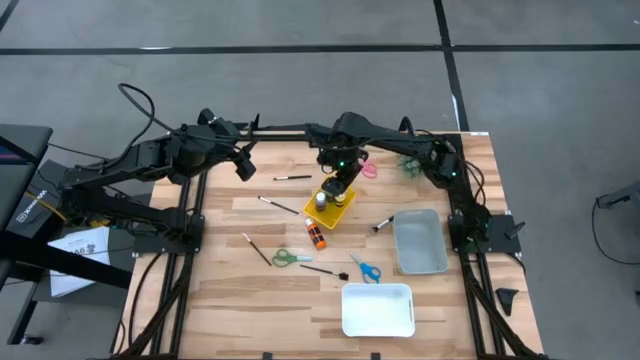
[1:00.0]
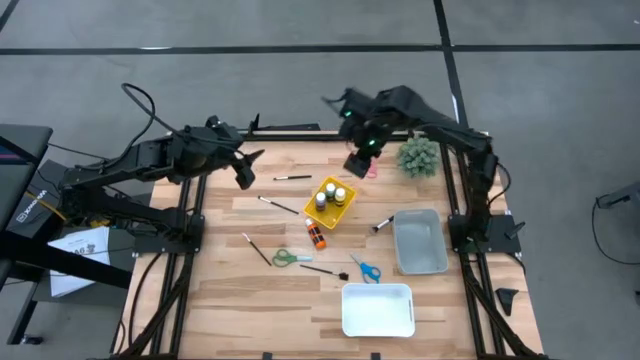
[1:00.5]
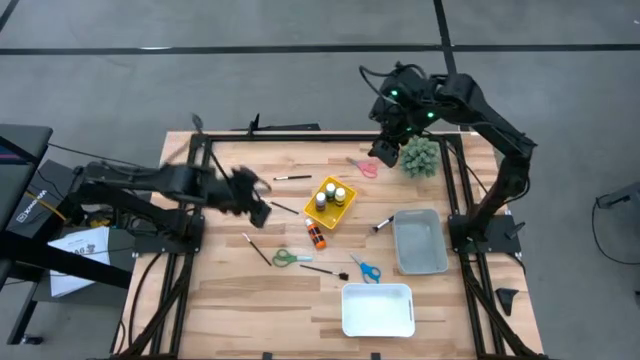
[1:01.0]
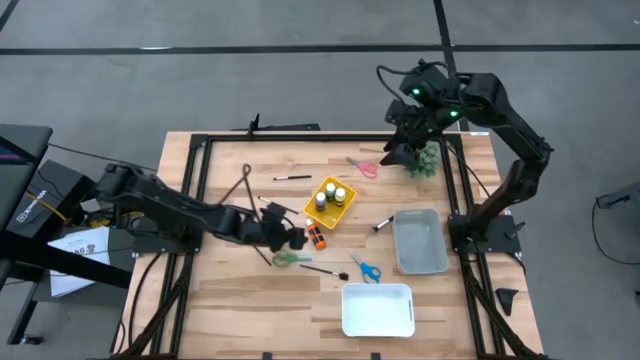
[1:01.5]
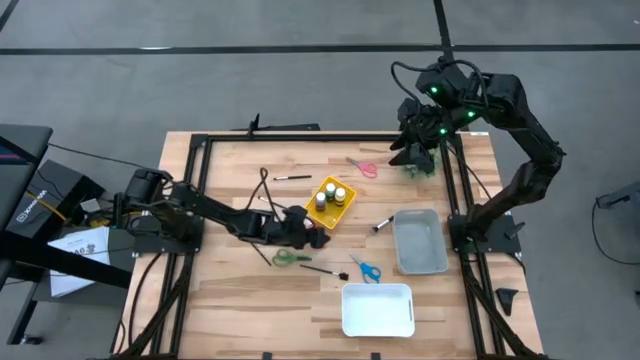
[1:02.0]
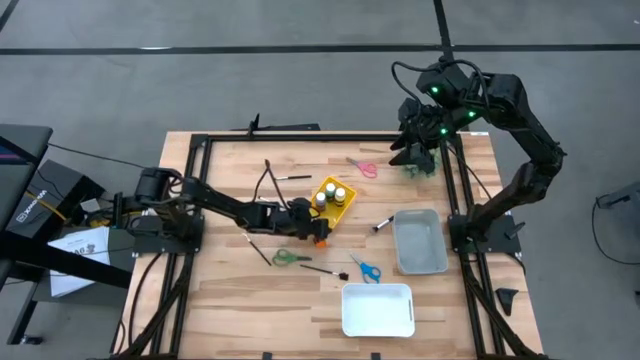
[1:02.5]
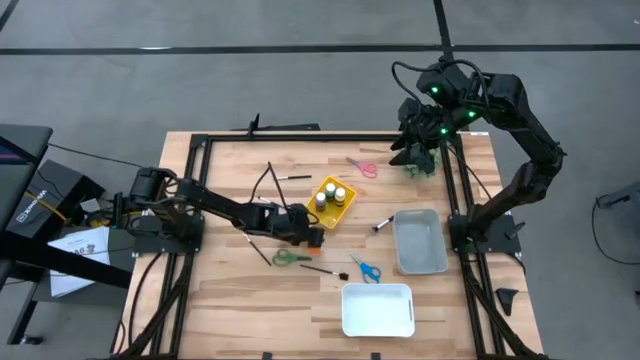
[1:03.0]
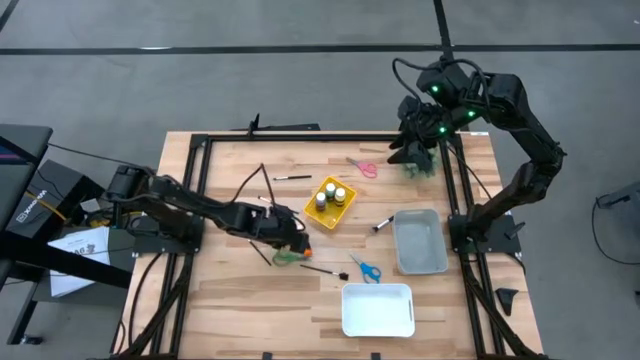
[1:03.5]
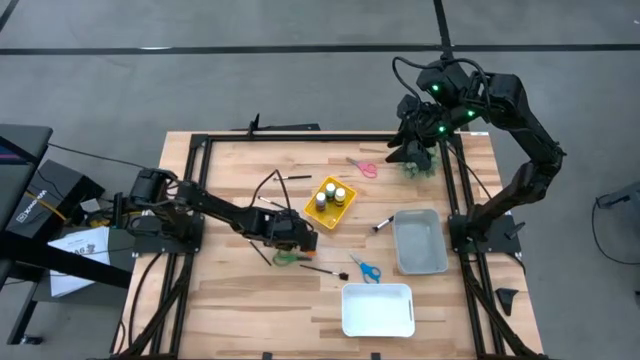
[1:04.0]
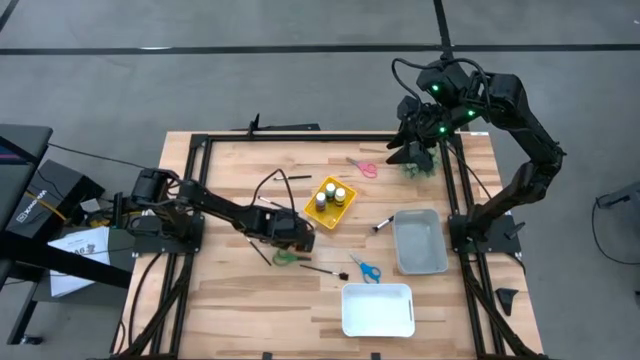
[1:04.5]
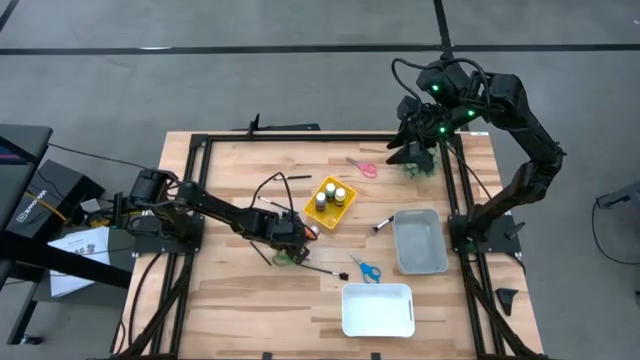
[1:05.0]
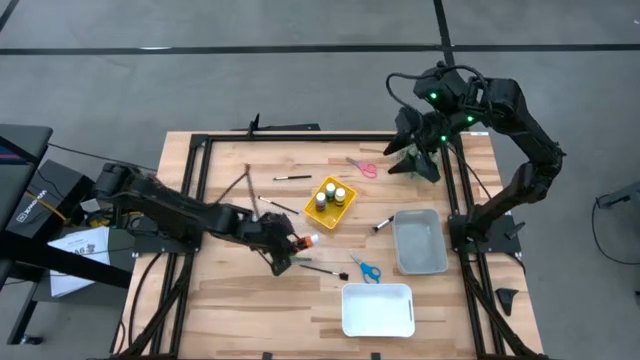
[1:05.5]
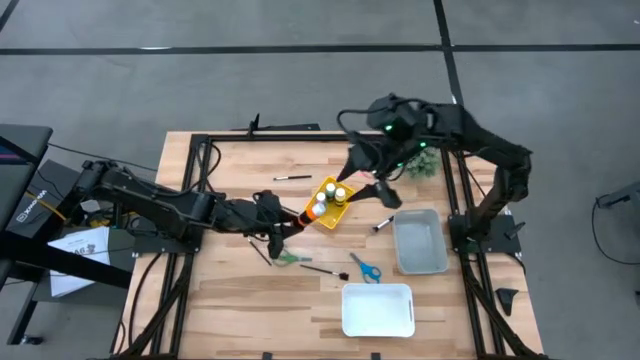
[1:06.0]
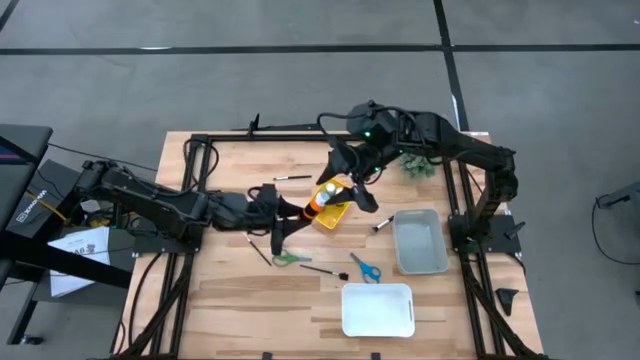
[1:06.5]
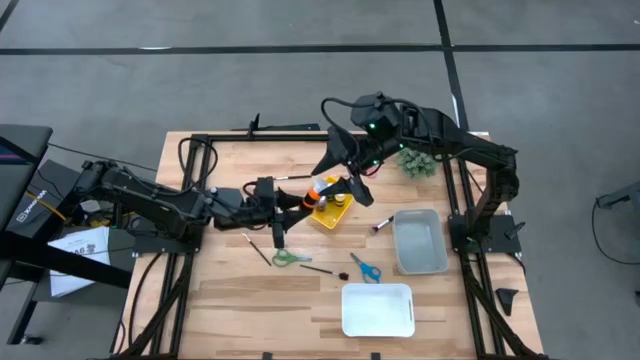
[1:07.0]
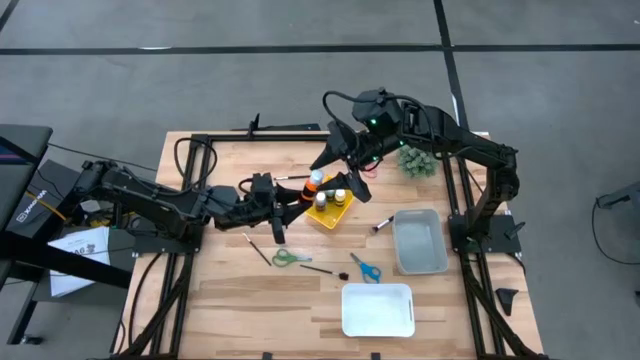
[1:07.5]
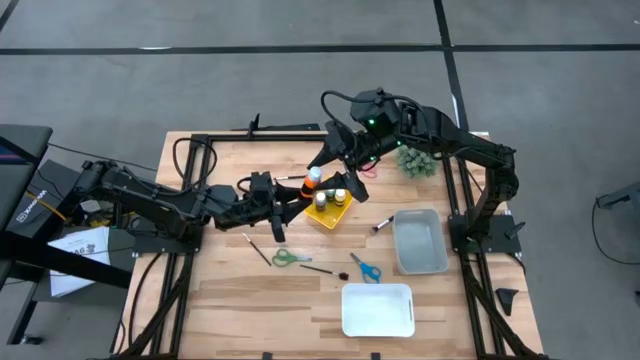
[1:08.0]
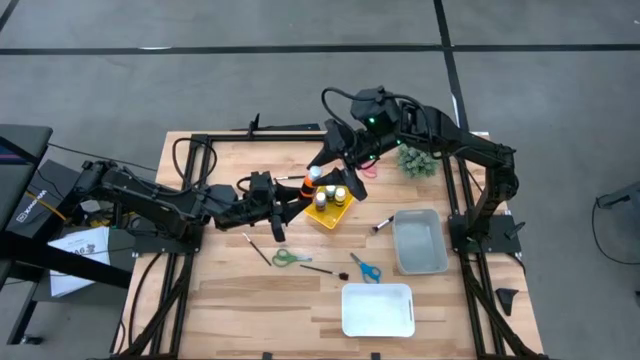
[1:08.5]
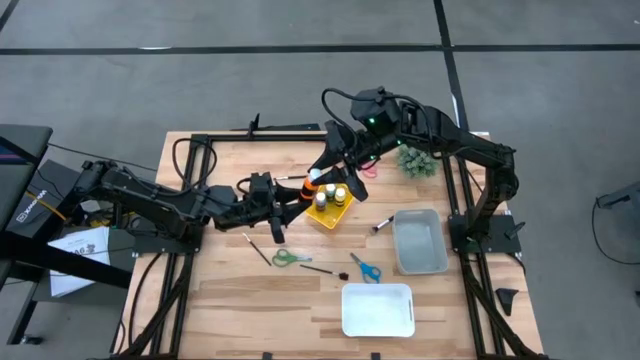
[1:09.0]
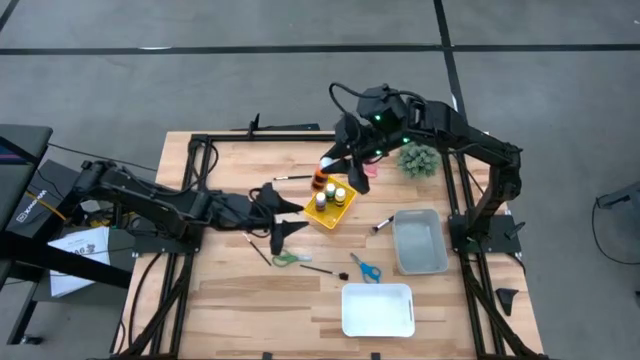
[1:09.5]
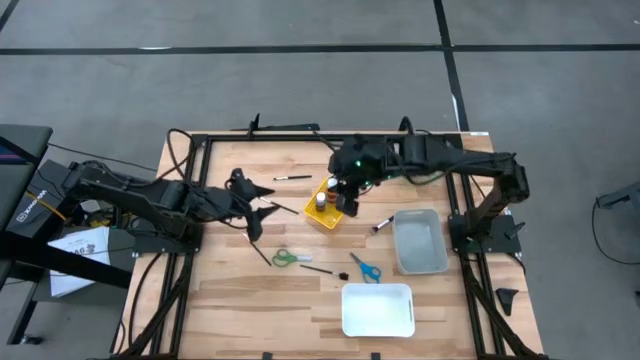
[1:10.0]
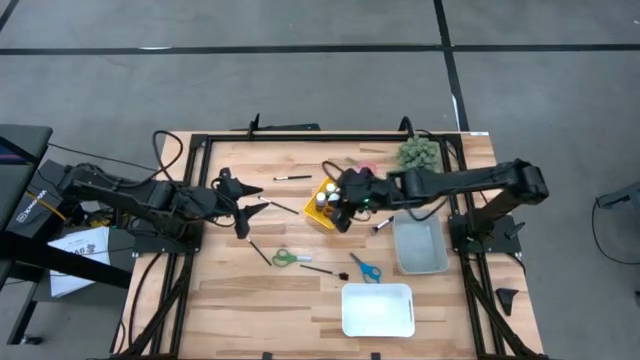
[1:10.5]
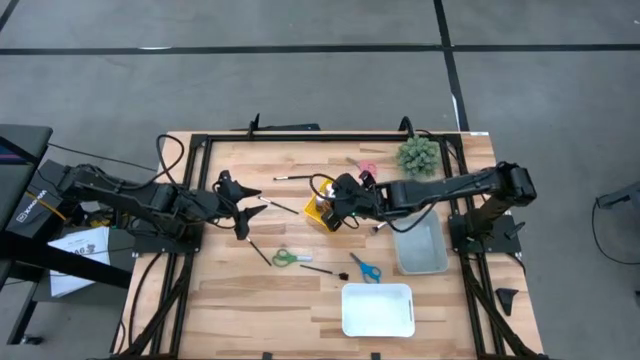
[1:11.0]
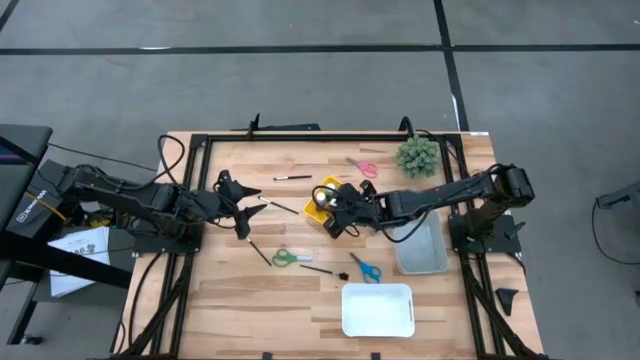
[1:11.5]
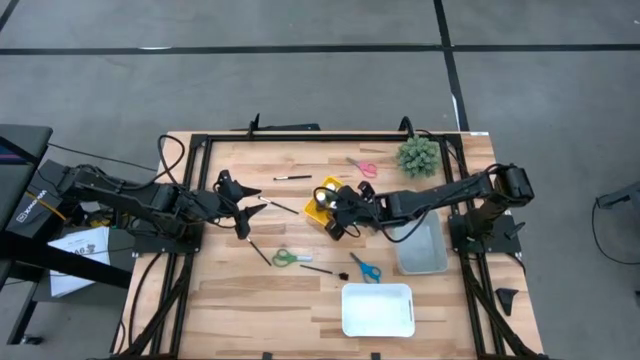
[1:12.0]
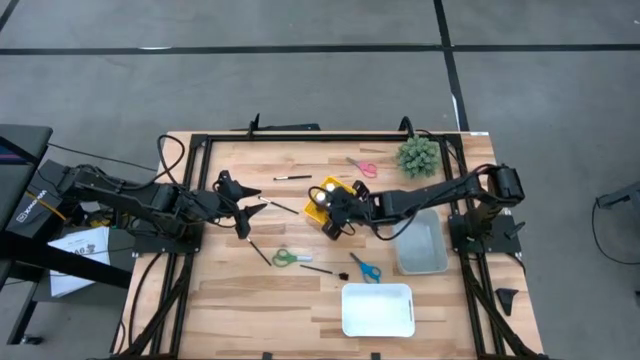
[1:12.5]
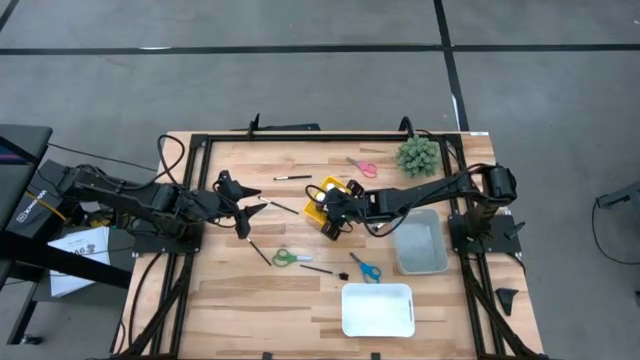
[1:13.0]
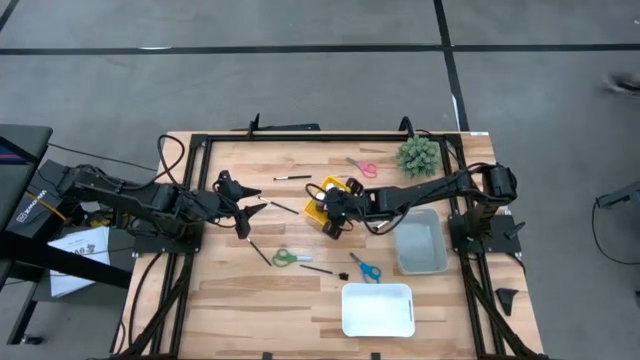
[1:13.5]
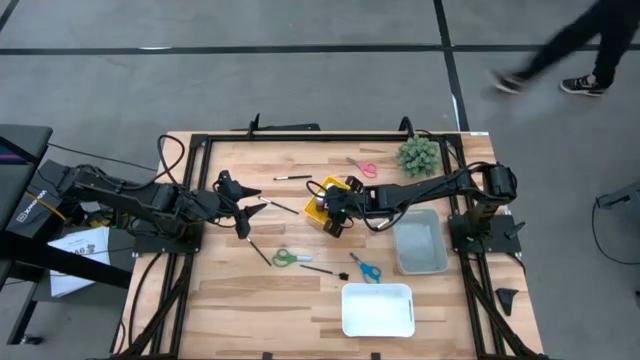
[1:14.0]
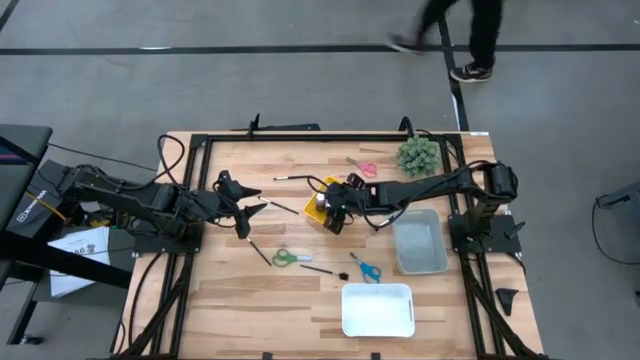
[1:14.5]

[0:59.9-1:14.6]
Task: Pick & Place Paint Supplies
Put the orange paint bottle into the yellow bin
